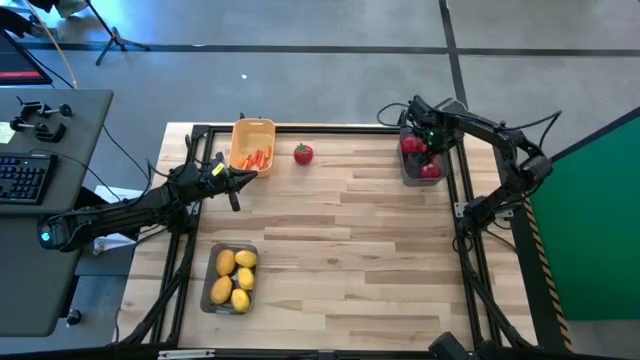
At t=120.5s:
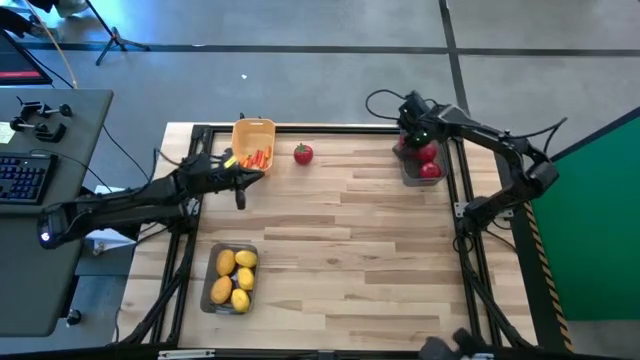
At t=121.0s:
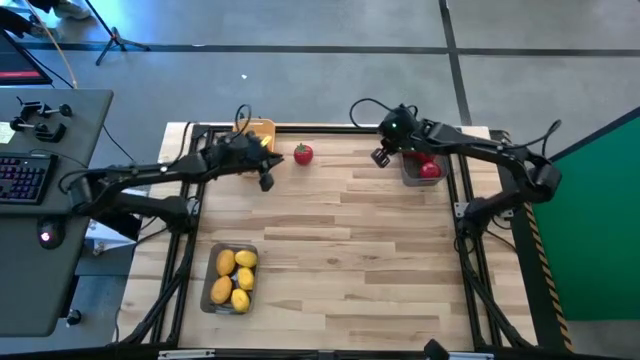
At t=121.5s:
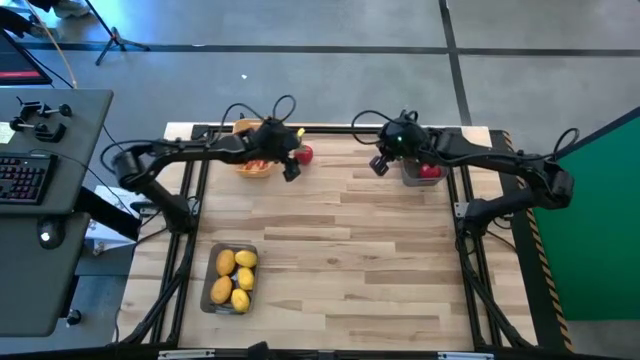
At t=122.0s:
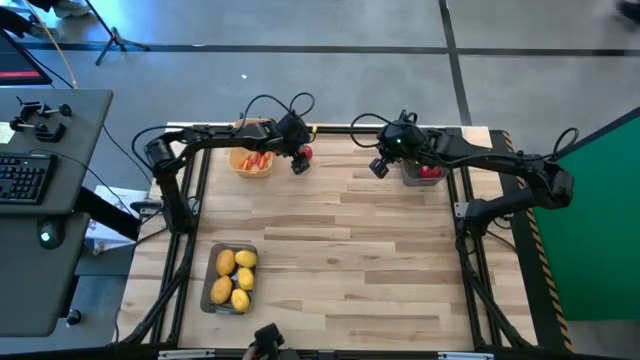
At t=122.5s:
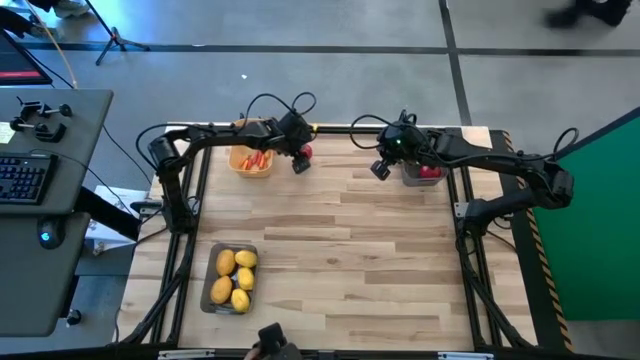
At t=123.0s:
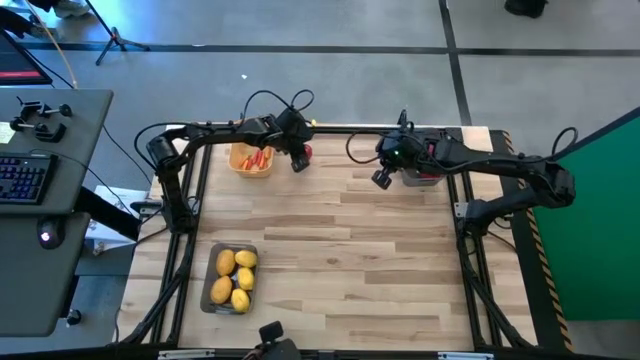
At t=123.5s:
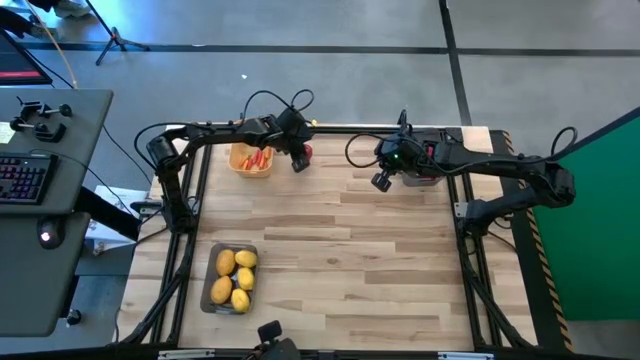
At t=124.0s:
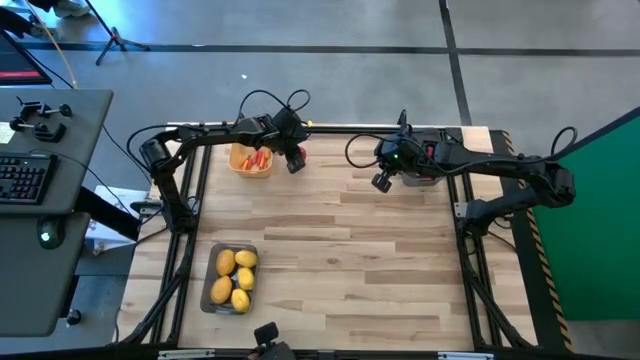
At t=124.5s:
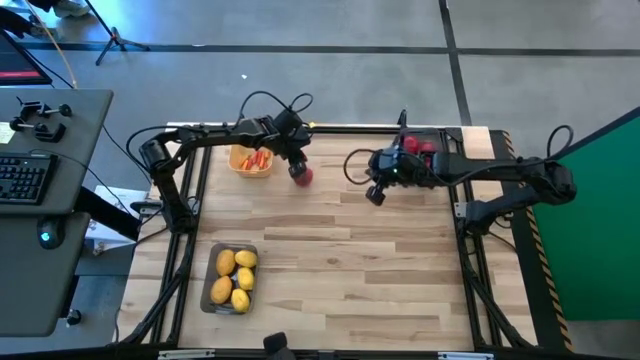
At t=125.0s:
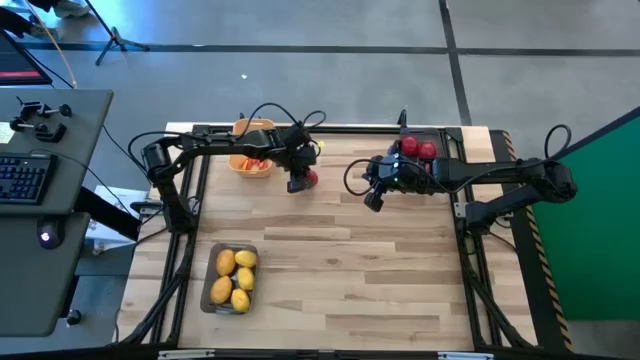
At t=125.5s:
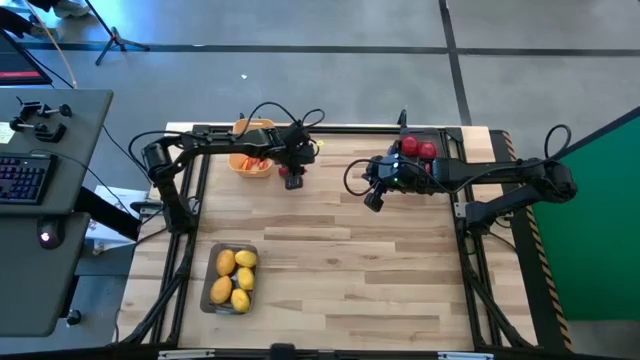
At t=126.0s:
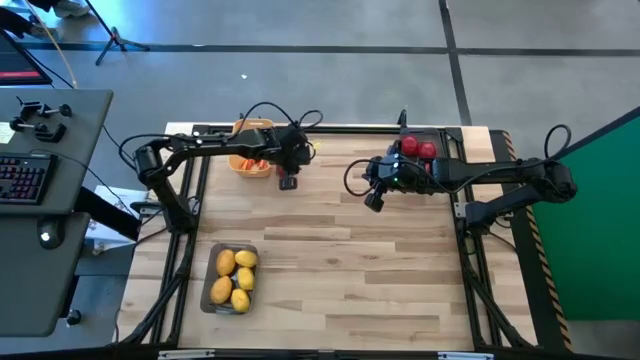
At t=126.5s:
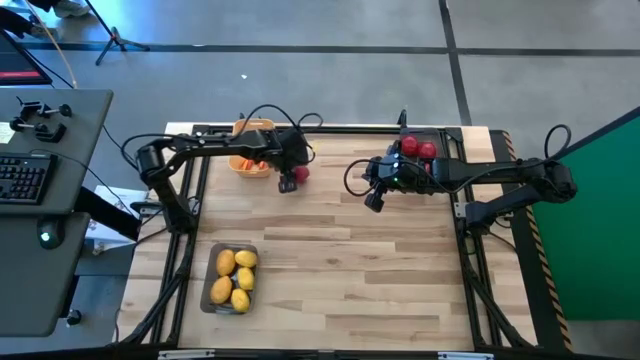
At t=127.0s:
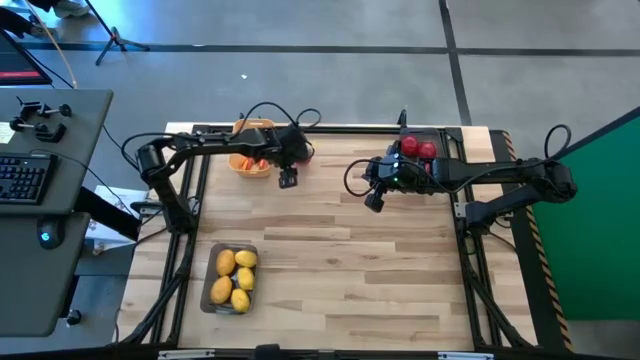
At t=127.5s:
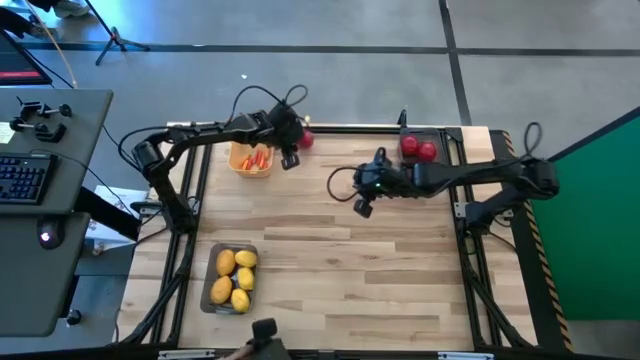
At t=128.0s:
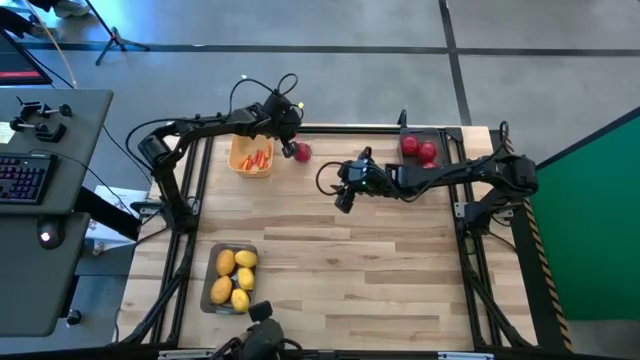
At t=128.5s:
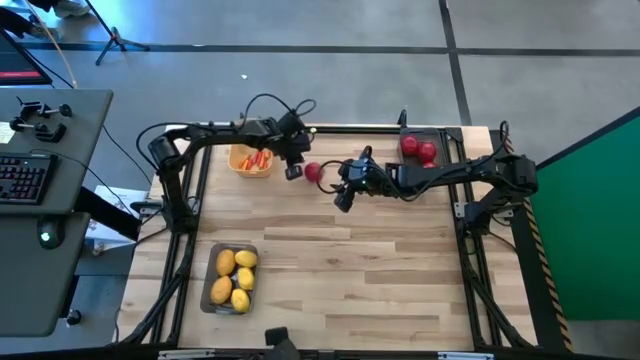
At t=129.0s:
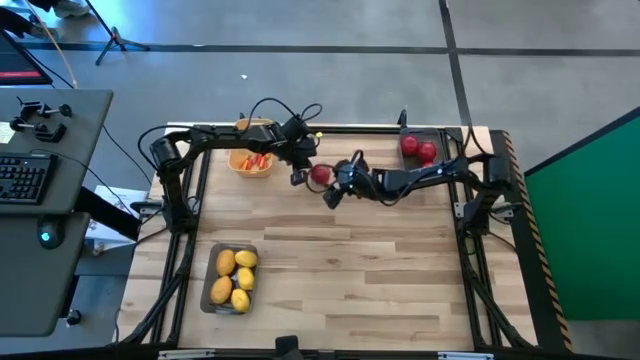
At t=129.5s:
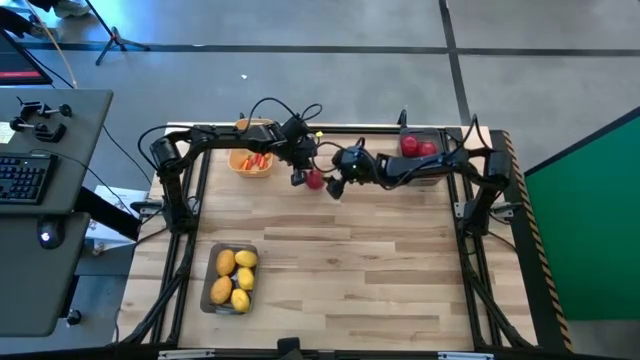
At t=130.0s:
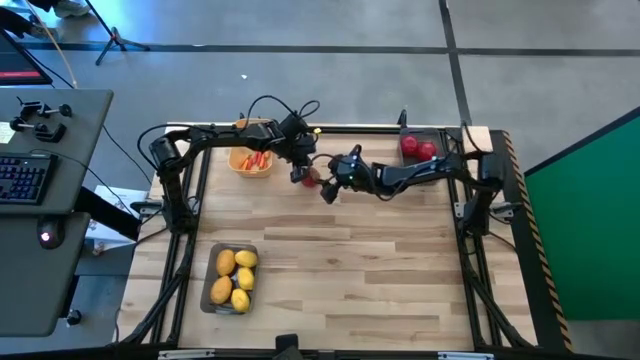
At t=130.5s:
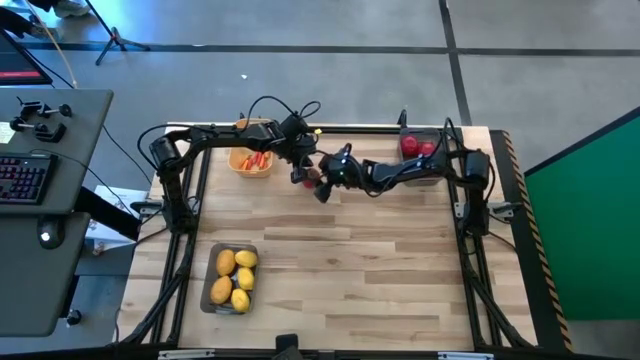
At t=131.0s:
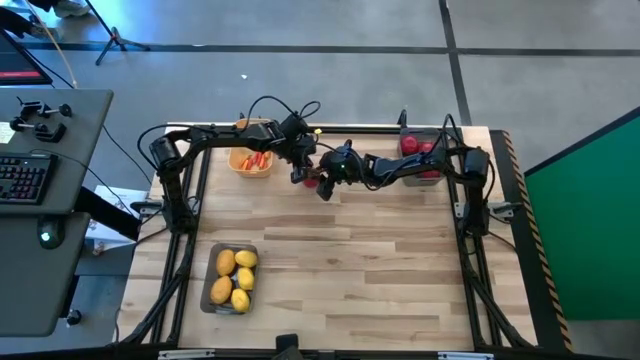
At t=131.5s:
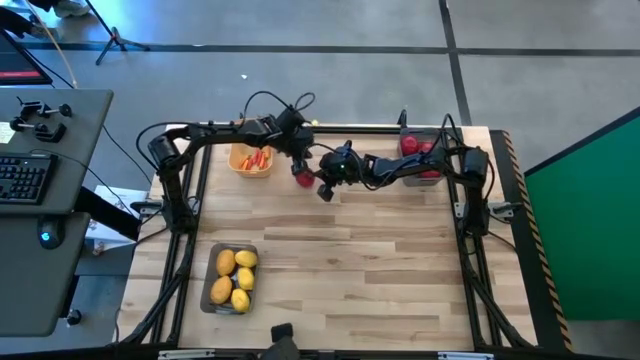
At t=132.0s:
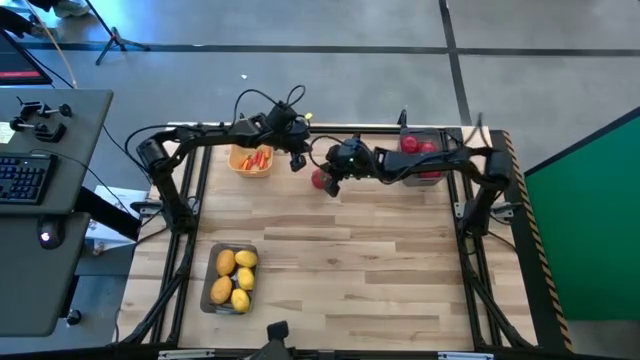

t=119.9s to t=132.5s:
Task: Sort produce into baskets
Put the tomato into the top gray bin

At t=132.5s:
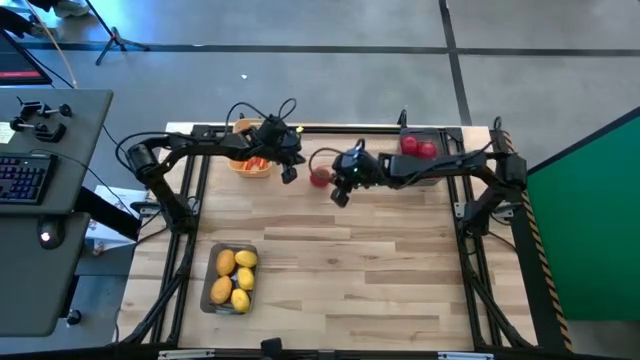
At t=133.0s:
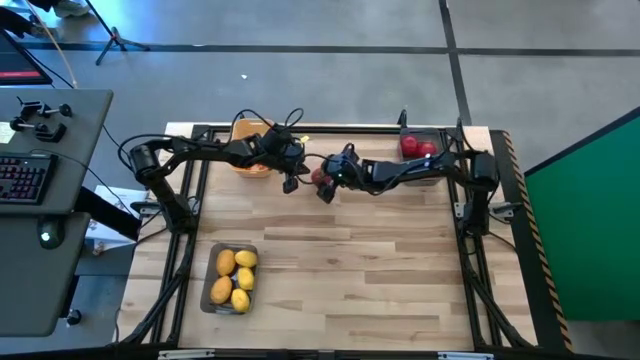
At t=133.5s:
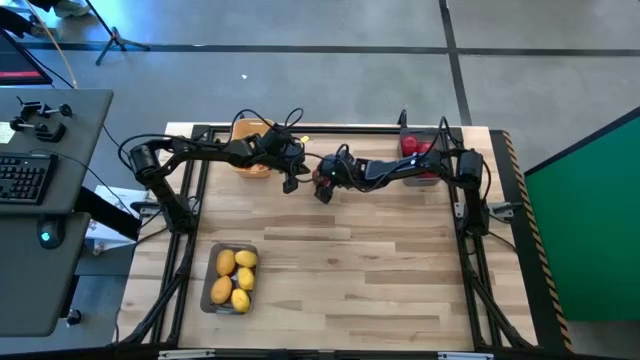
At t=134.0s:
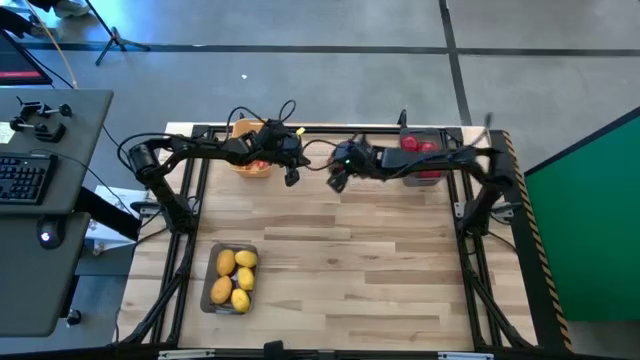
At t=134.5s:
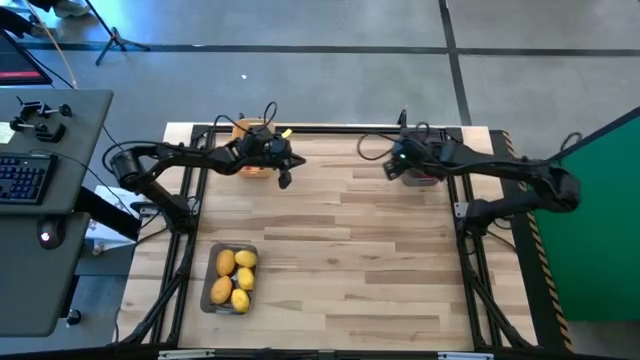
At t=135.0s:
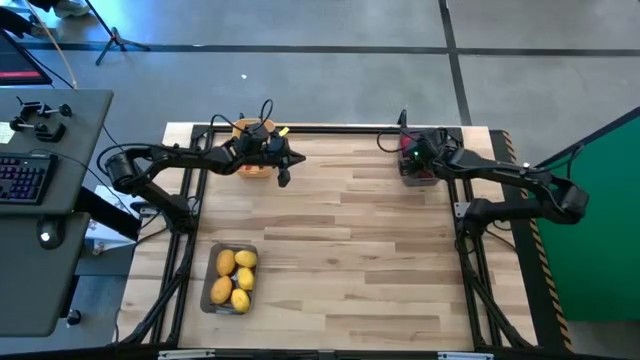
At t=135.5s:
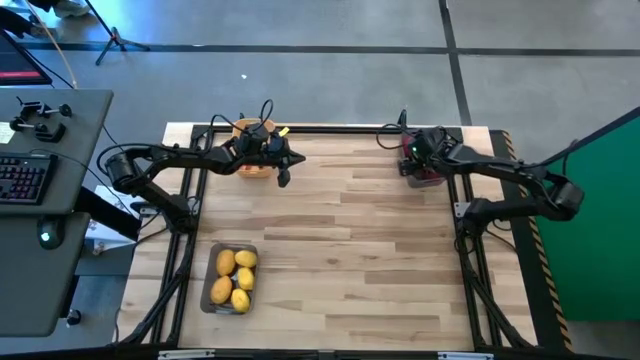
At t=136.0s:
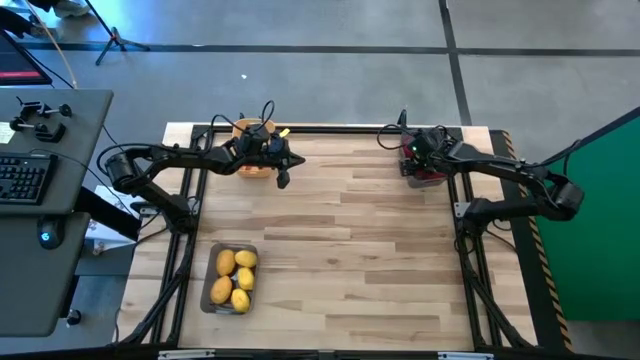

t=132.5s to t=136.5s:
Put the tomato into the top gray bin

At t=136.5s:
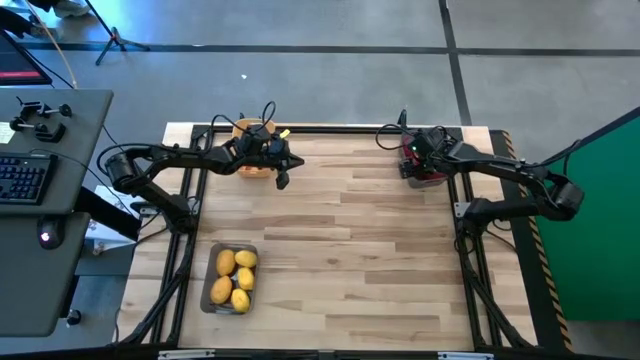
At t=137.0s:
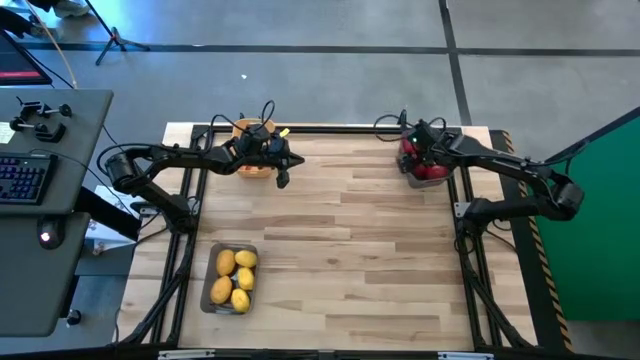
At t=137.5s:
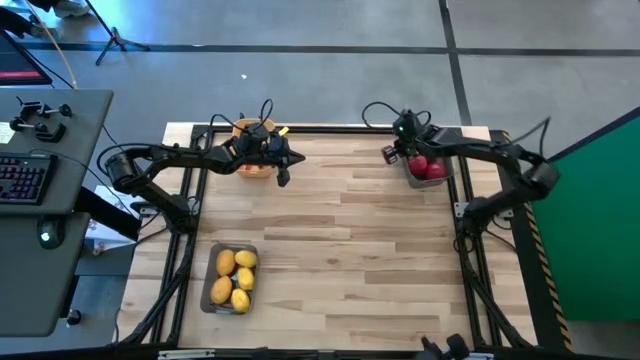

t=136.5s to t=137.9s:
Adjust the top gray bin

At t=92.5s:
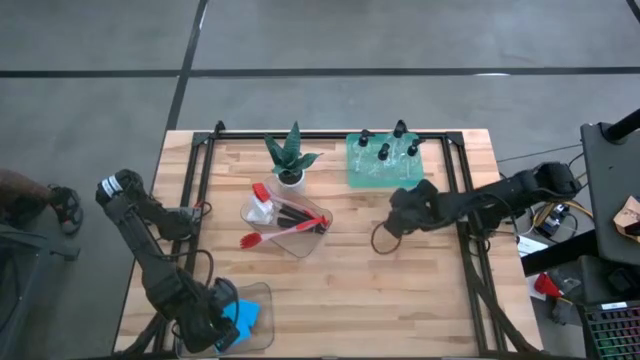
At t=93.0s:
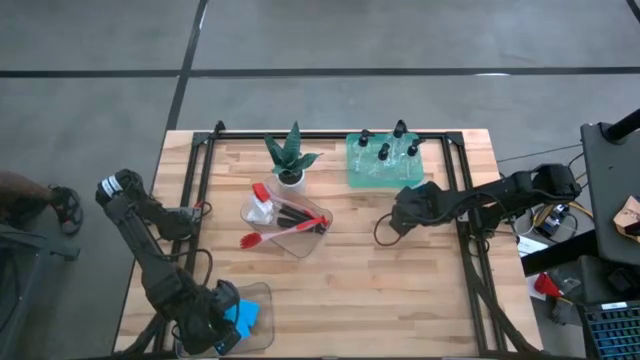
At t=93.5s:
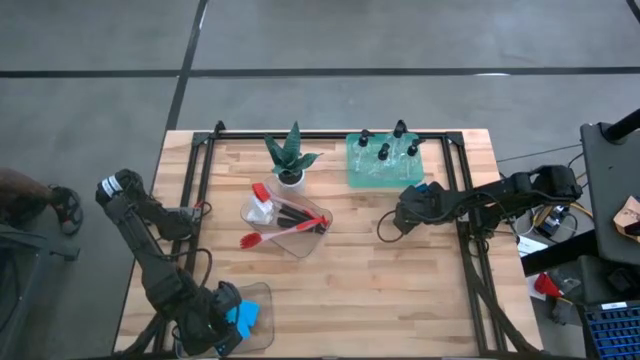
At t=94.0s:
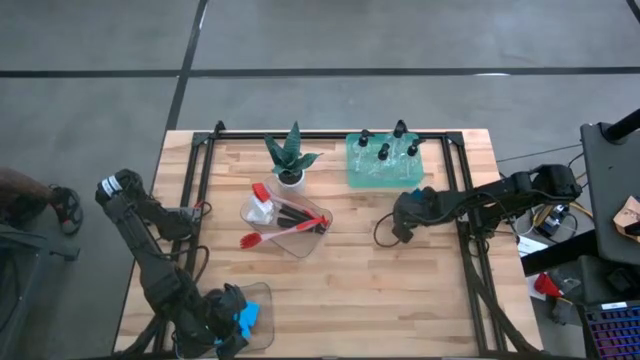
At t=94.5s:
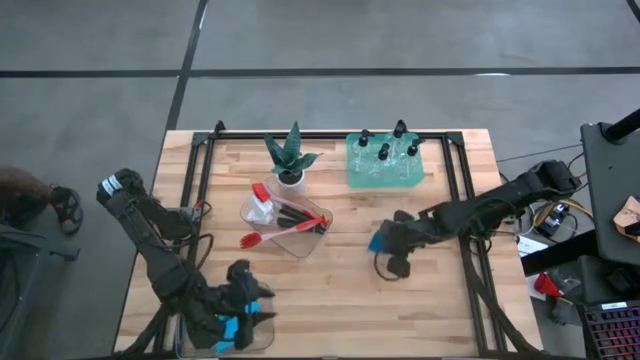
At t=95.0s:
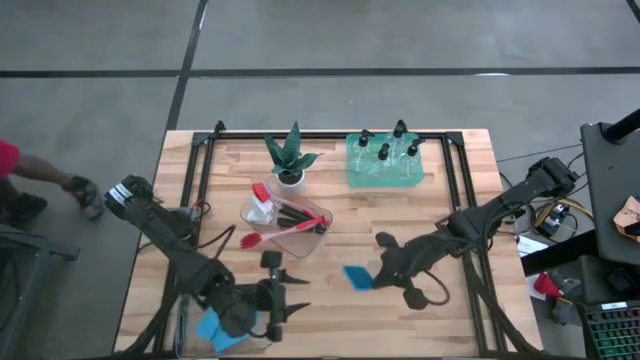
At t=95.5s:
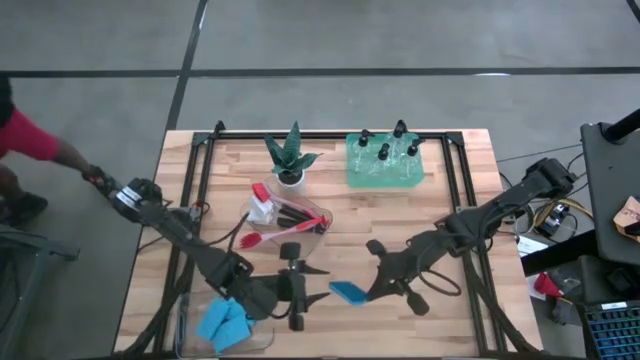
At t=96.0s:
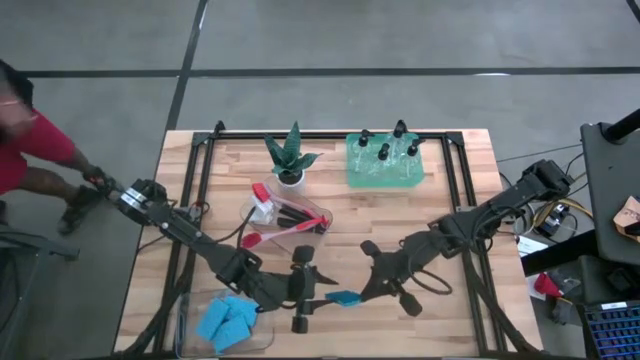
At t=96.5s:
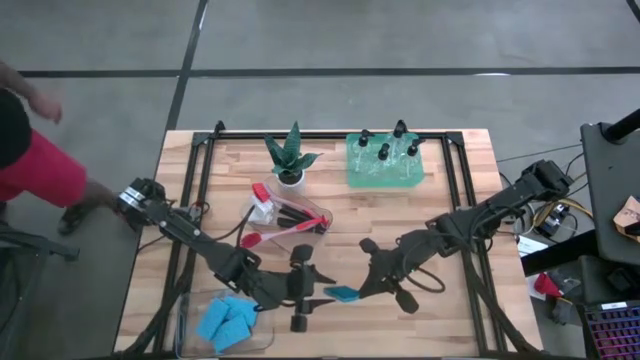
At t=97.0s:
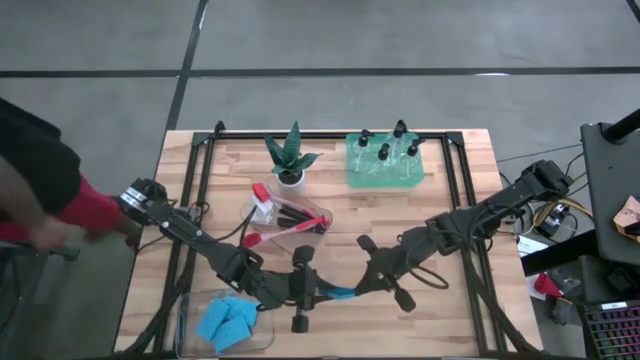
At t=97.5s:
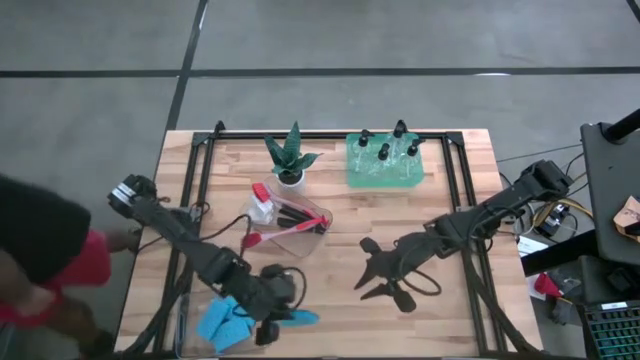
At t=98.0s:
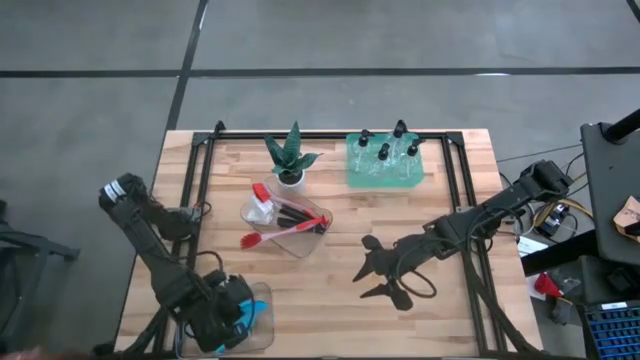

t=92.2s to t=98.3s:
Task: Pick & Place Kitchen Sink Supplies
Put the blue sponge into the bottom transparent bin
